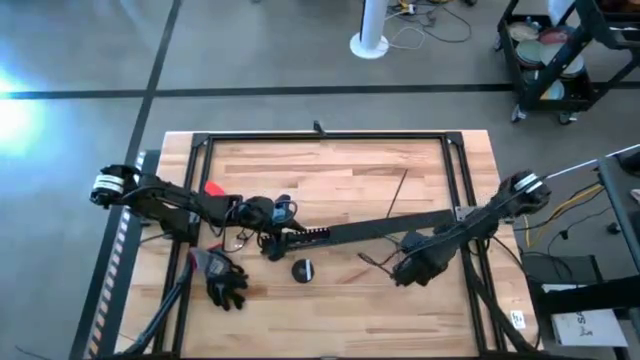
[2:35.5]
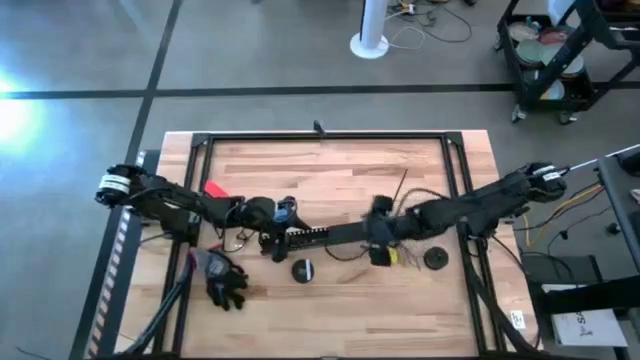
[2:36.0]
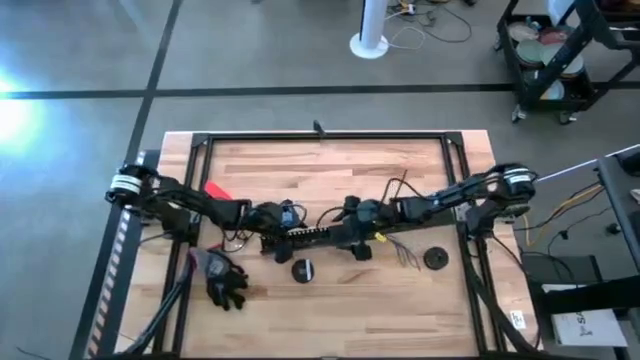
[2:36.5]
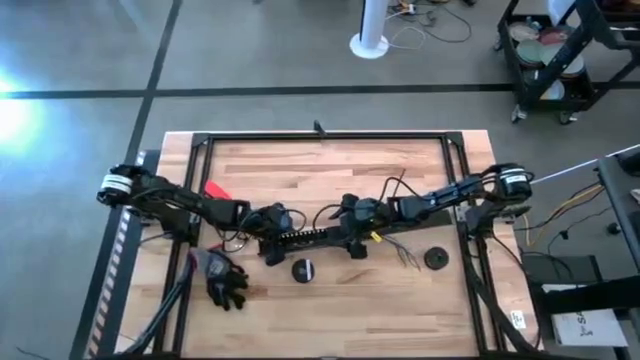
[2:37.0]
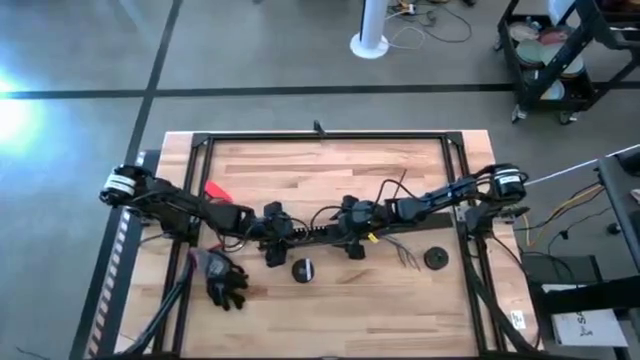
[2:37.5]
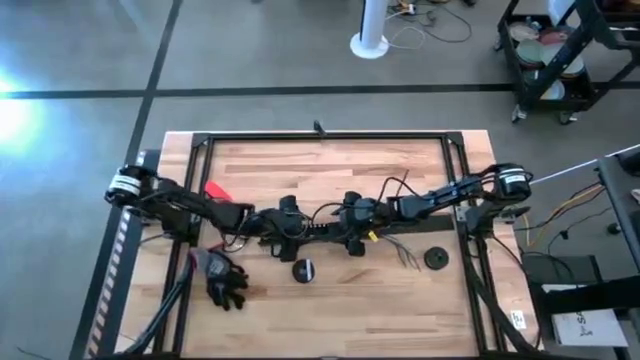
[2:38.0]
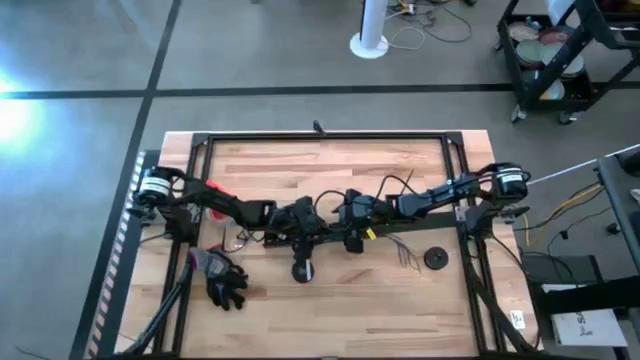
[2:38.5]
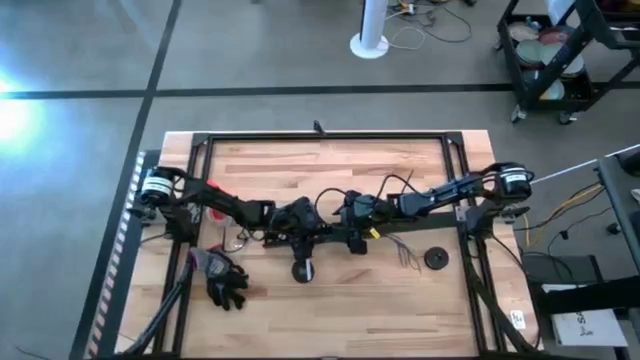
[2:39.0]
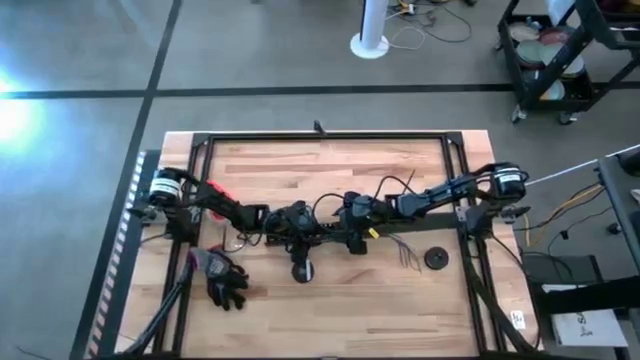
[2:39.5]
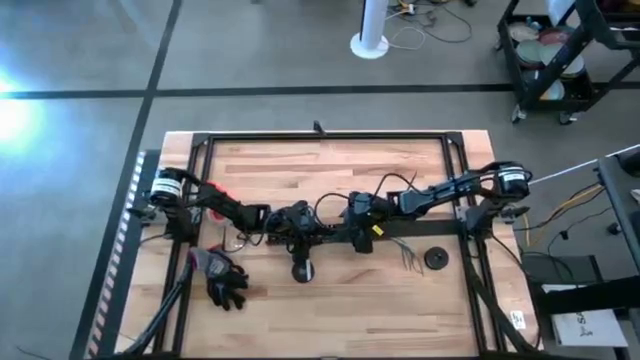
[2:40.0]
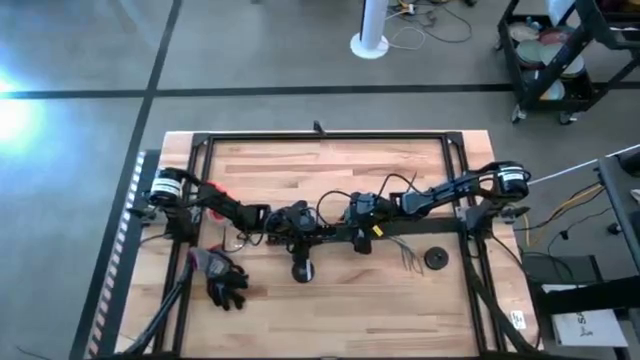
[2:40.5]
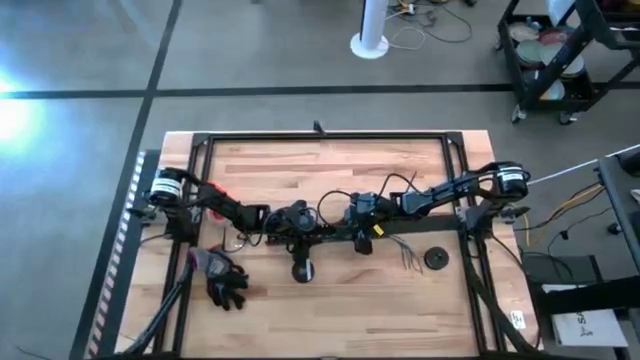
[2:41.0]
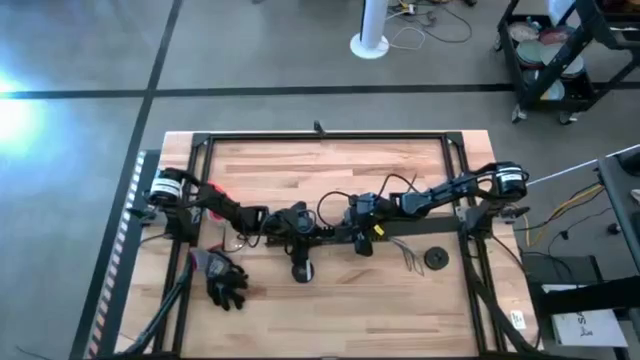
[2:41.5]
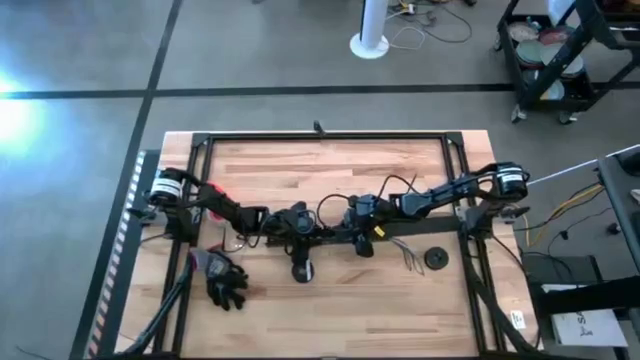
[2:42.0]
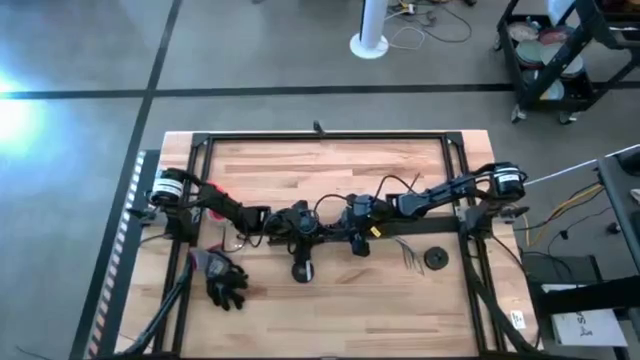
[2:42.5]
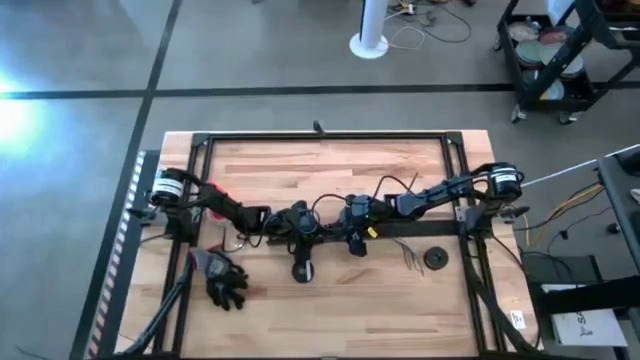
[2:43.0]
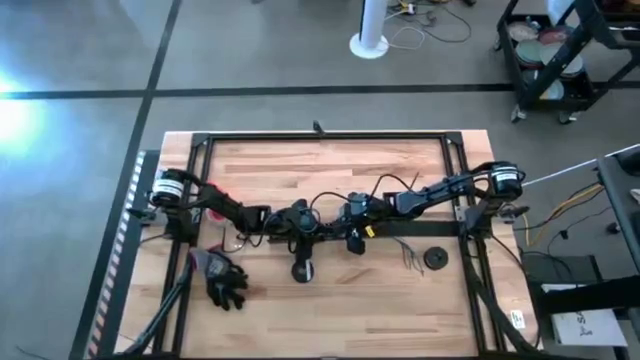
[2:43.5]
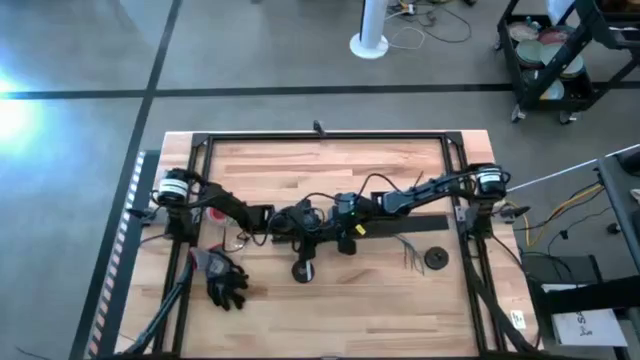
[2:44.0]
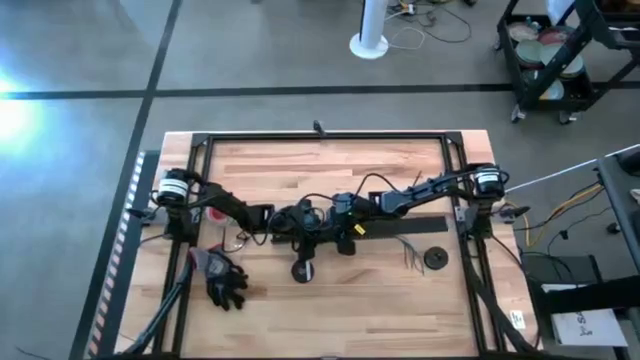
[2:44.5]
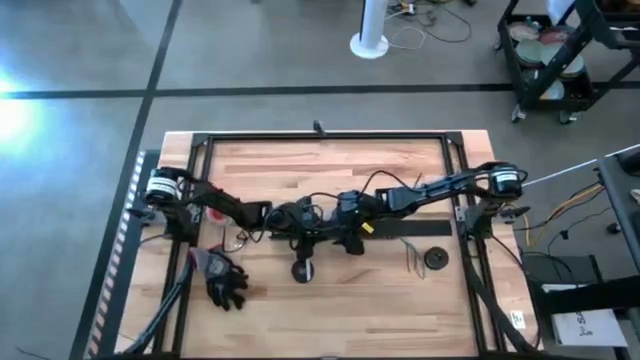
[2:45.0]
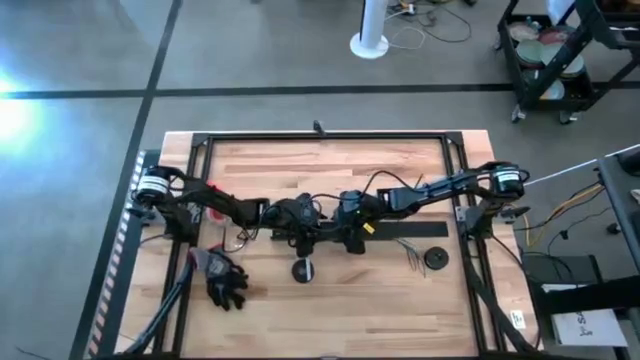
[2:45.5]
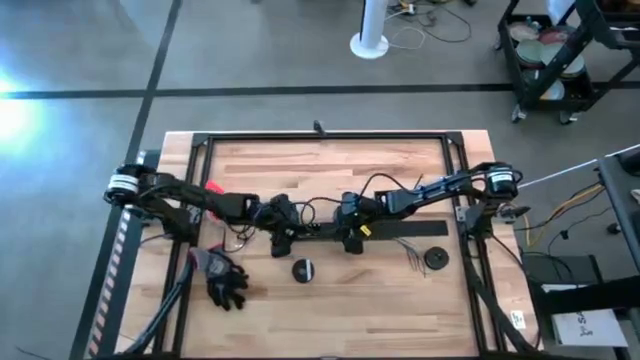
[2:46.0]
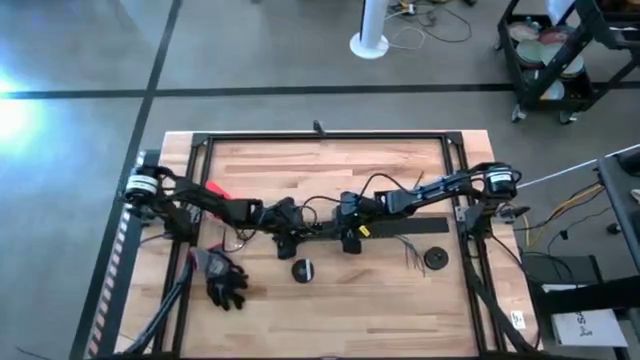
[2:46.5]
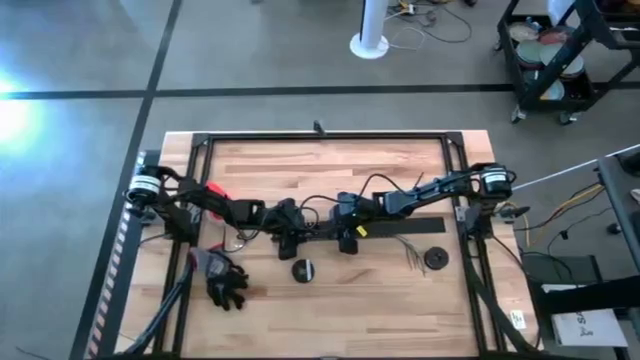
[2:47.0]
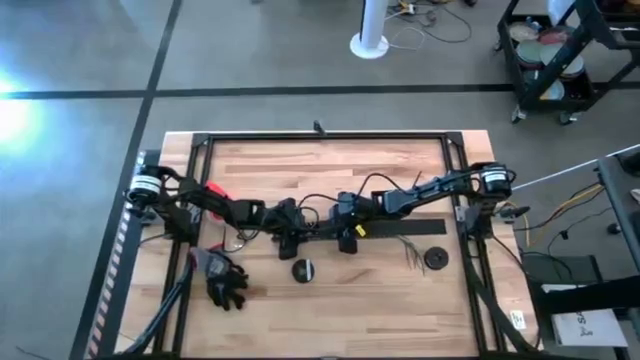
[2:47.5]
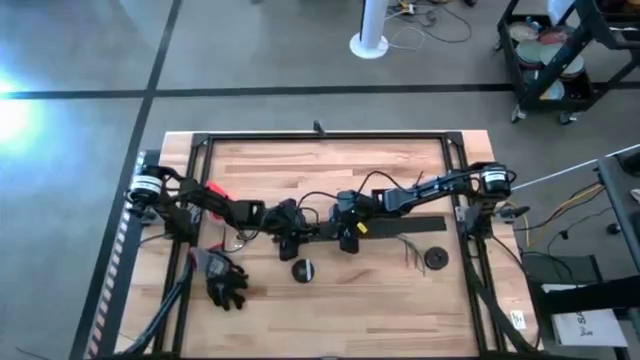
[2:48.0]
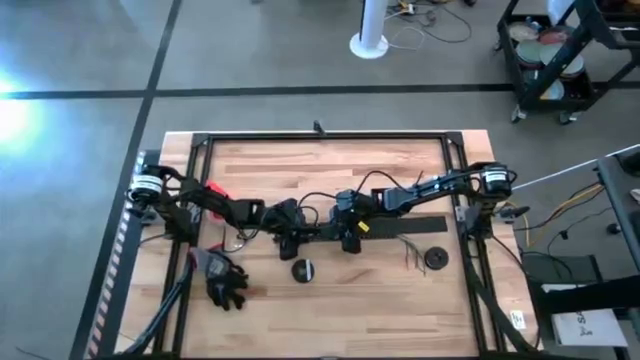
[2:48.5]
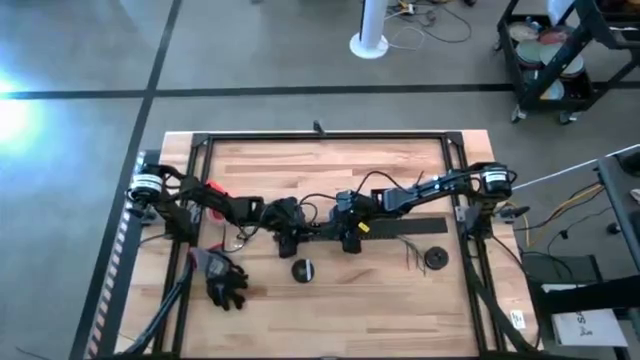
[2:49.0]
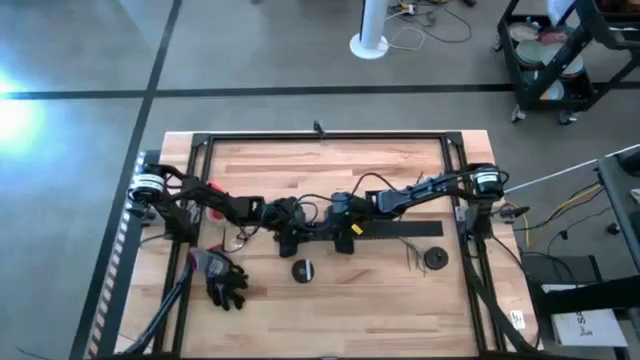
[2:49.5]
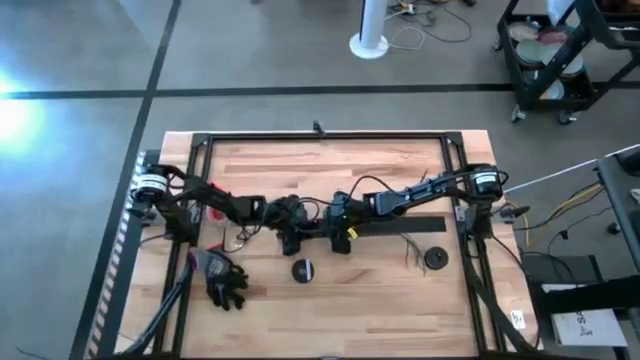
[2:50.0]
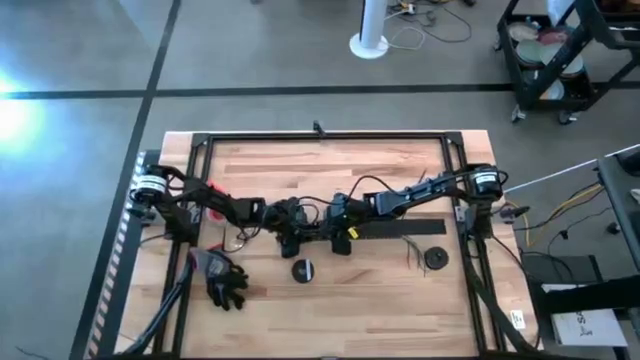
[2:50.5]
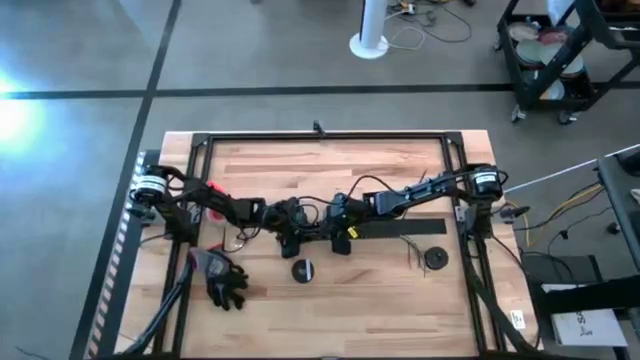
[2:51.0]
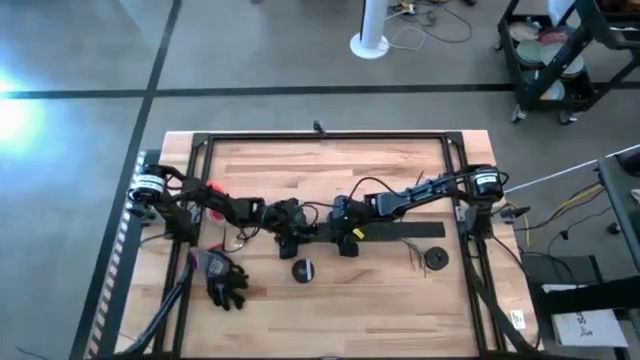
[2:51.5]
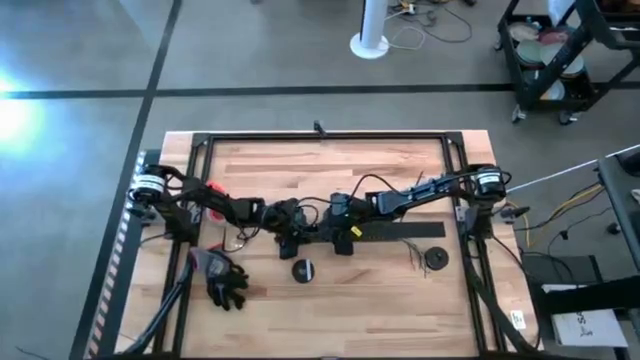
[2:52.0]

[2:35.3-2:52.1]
Task: Ziptie cables
Close the black cable duct

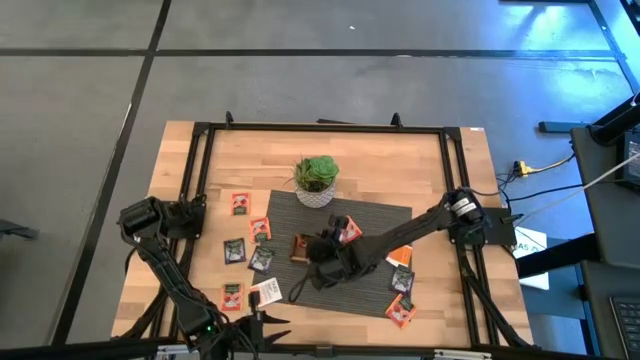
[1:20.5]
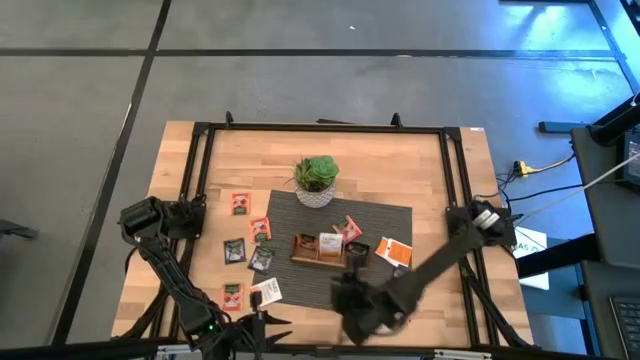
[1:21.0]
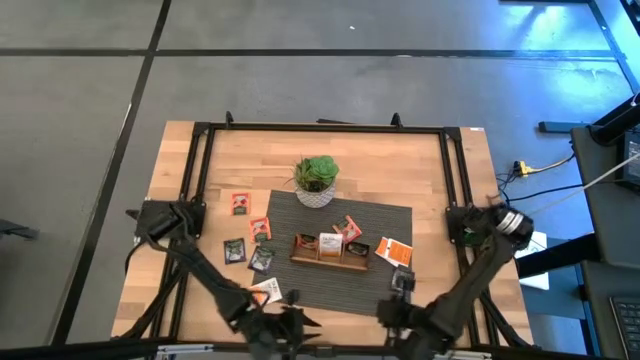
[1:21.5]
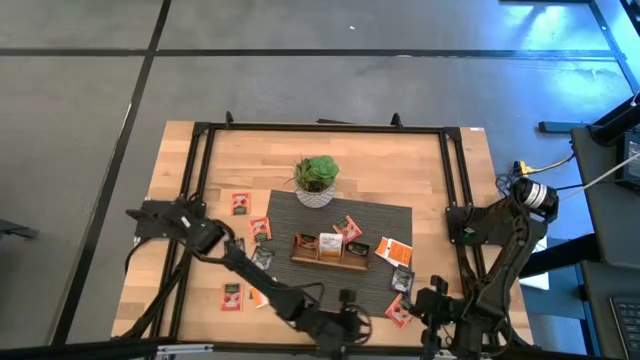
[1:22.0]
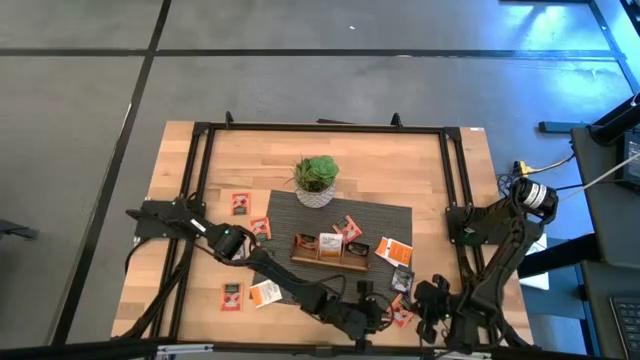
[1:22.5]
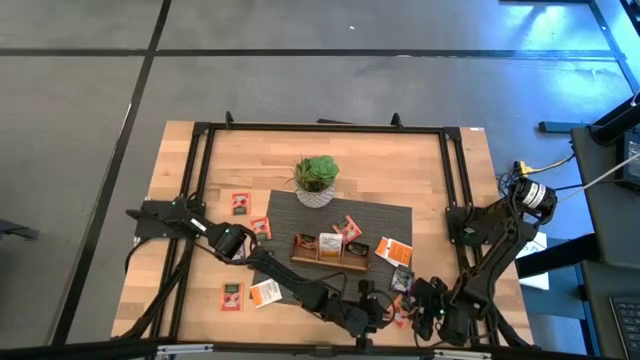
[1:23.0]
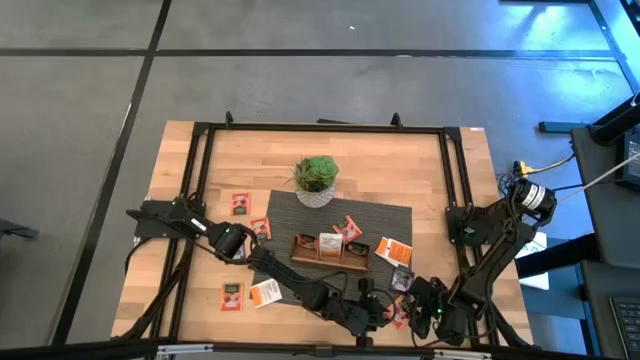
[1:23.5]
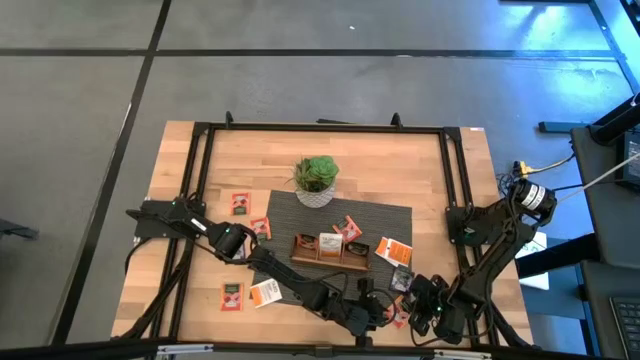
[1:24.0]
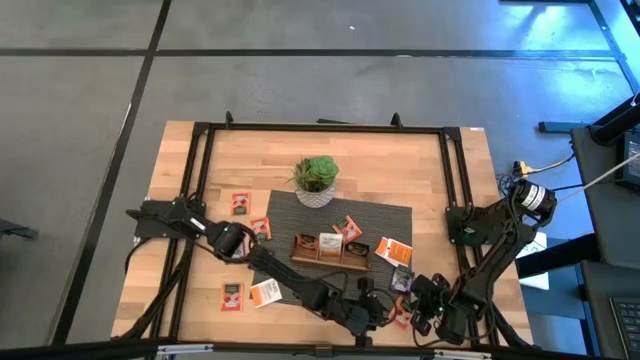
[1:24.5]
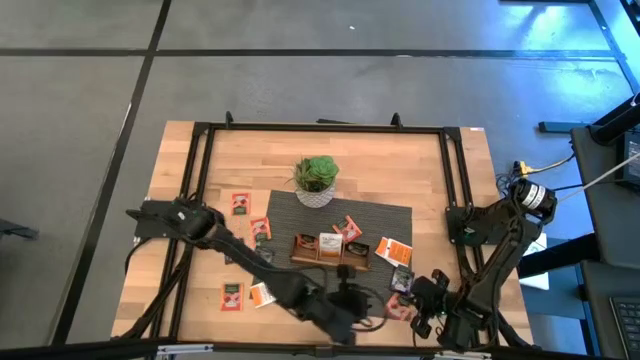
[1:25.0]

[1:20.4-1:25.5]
Task: Pick & Place Tea
Put the orange tea bag into the left section of the wooden organizer
